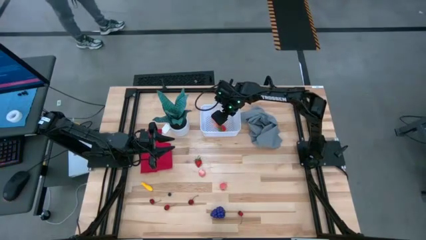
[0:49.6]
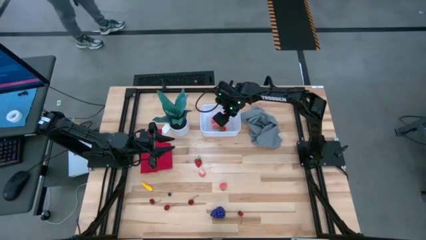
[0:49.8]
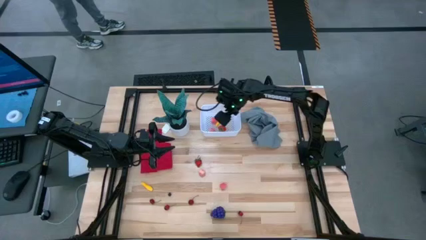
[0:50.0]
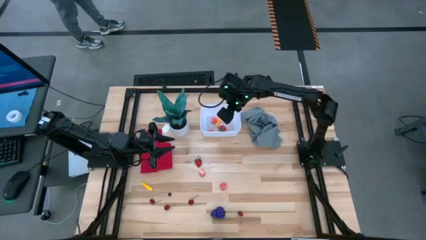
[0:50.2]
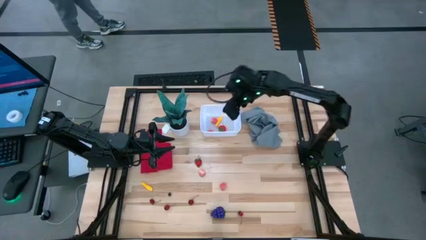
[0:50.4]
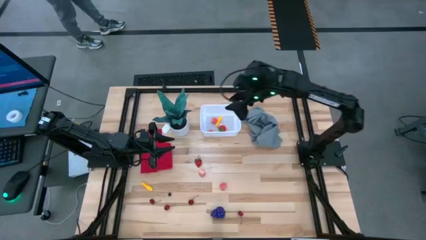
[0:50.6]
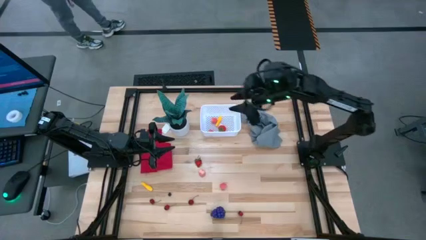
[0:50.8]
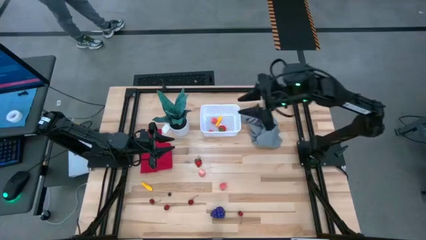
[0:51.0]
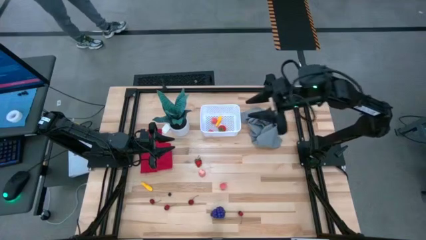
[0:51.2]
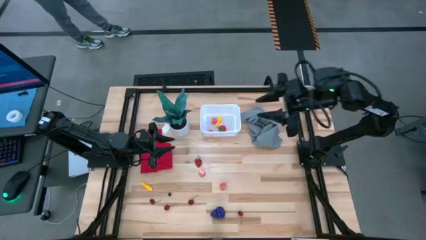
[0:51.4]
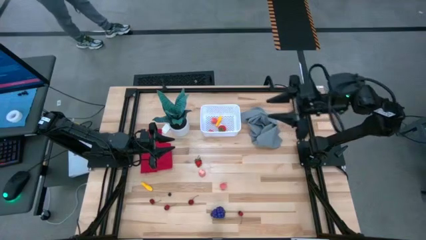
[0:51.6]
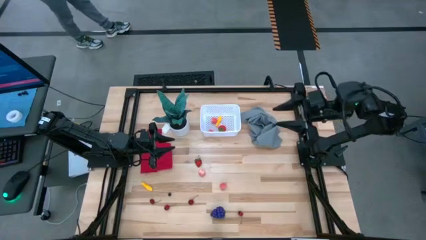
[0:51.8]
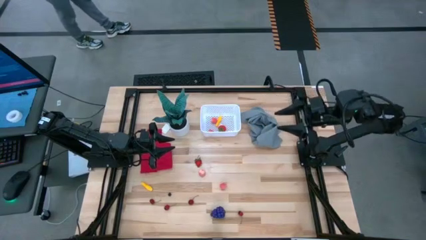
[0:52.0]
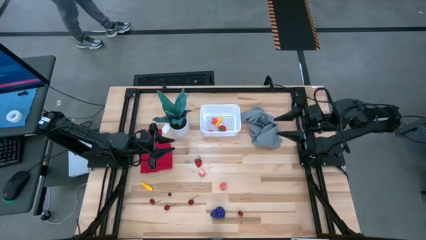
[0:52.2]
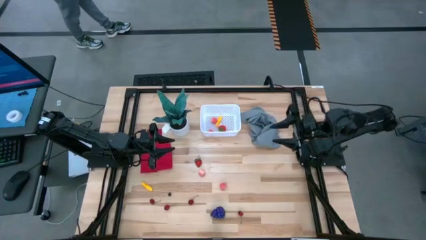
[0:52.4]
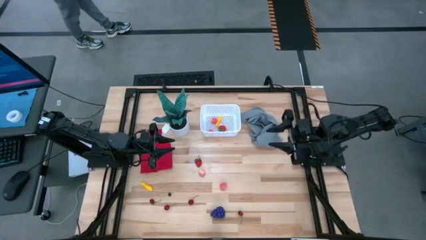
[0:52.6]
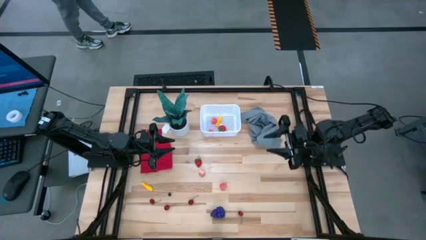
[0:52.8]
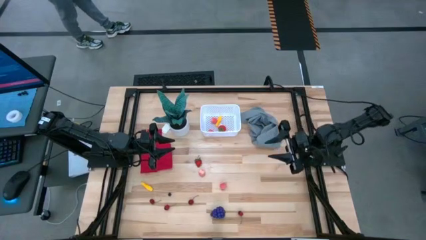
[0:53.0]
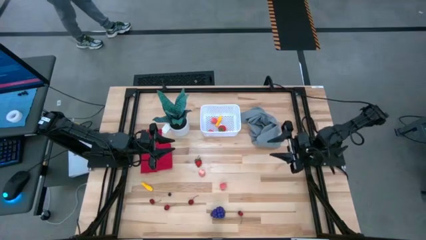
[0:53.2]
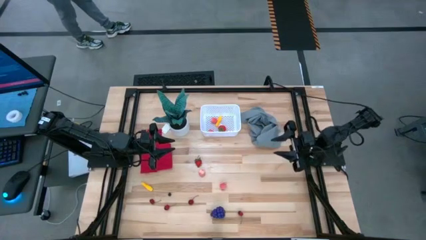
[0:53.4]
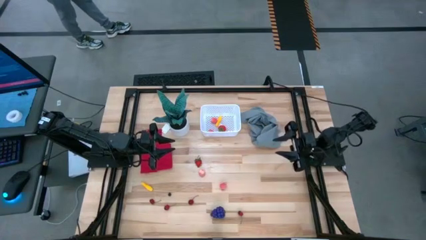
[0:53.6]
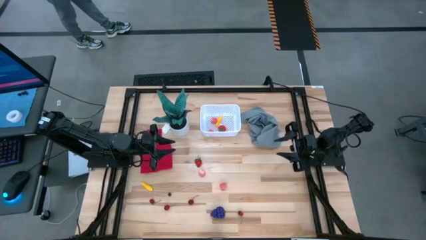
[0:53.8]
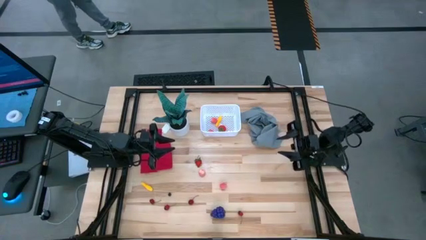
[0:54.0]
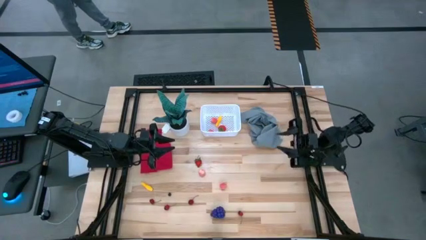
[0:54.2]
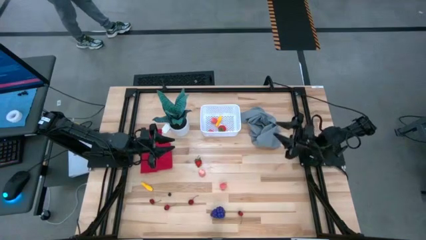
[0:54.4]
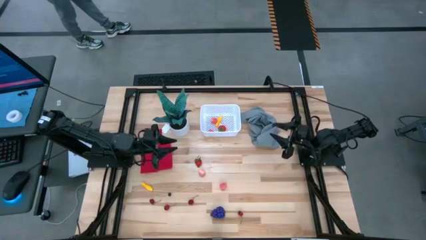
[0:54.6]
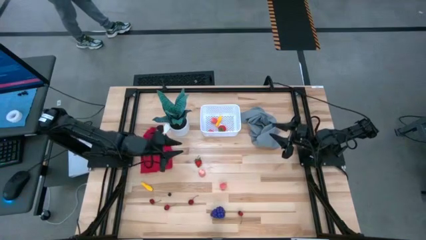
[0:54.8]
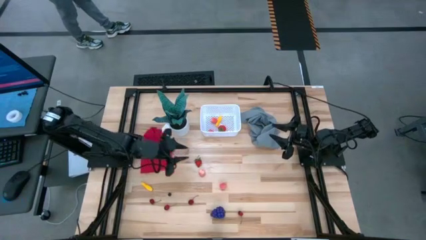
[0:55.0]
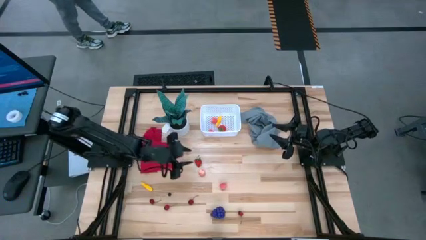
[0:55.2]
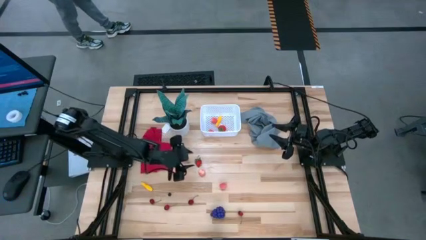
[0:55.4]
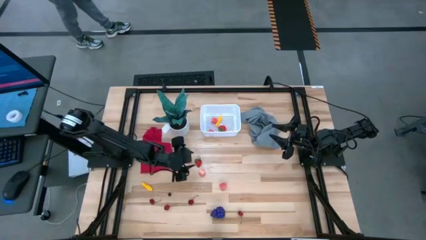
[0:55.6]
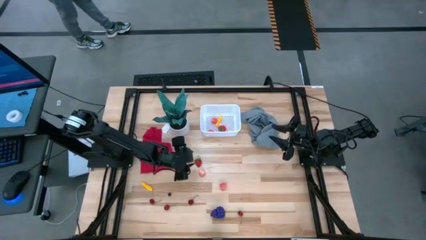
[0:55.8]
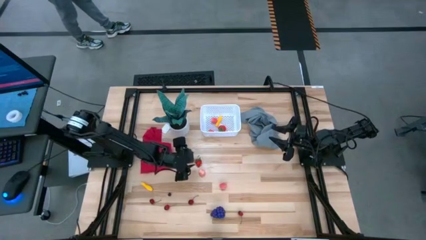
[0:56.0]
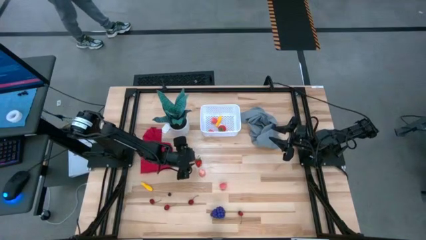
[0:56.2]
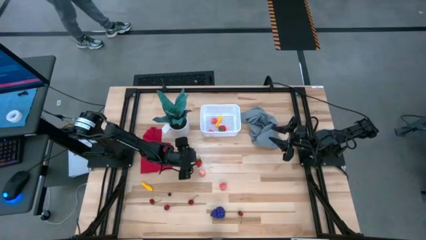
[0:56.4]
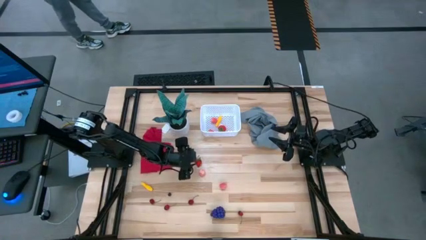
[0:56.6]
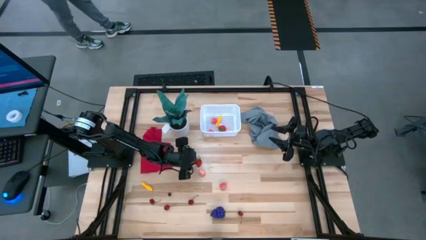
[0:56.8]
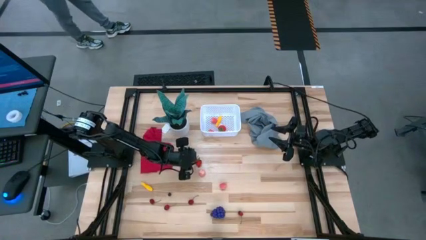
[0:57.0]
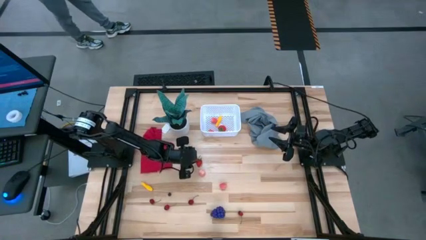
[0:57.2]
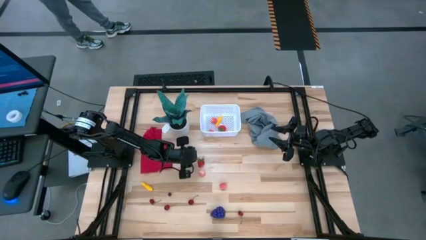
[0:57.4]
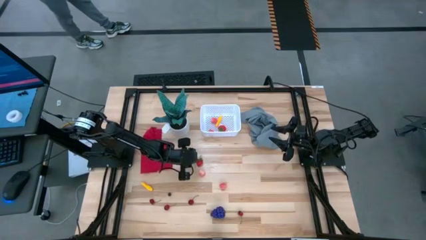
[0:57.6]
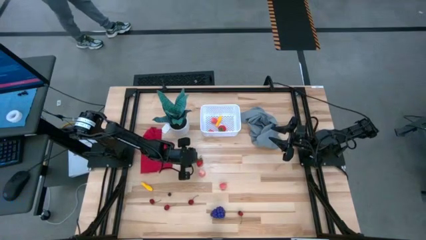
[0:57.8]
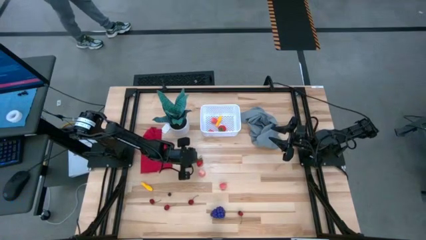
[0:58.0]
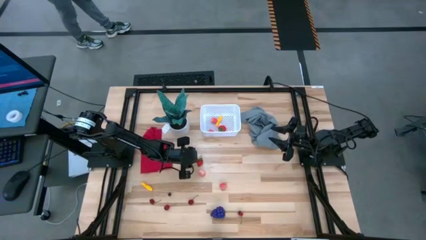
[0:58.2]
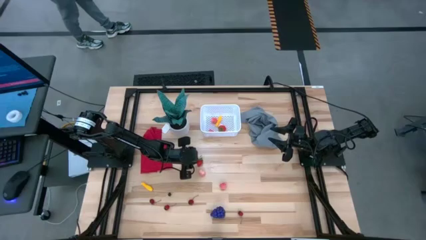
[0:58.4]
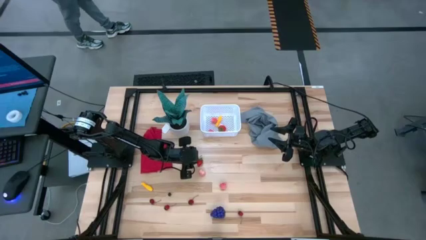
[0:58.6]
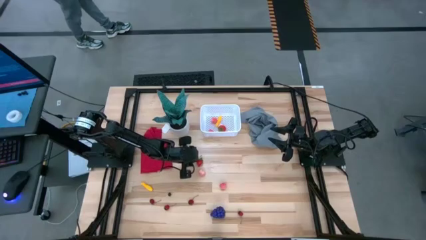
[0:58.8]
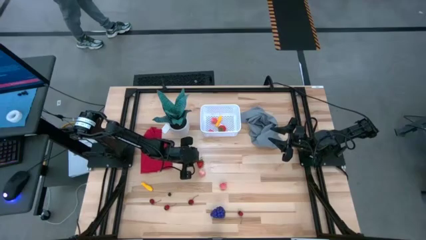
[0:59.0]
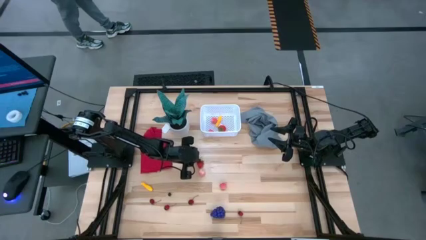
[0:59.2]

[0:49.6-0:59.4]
Task: Pick and placing Produce into tupperware
Put the red strawberry into the white bin

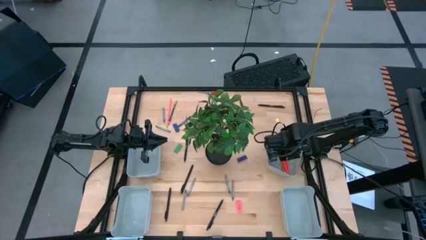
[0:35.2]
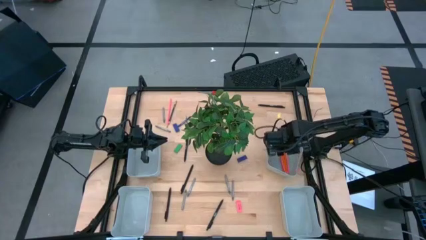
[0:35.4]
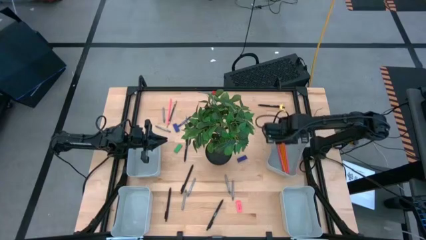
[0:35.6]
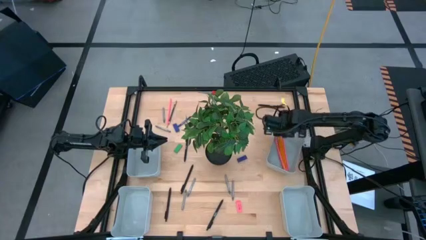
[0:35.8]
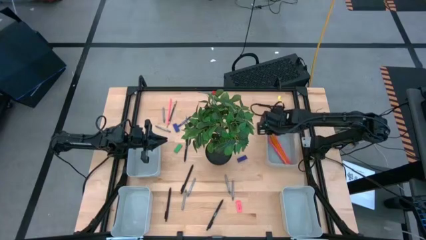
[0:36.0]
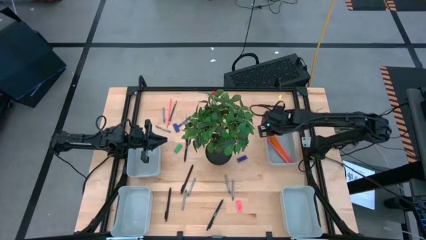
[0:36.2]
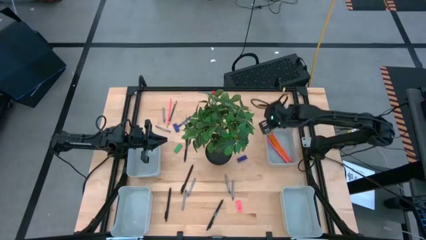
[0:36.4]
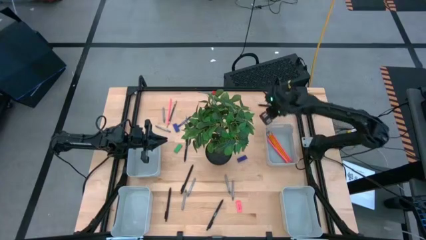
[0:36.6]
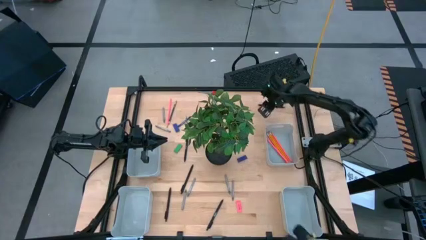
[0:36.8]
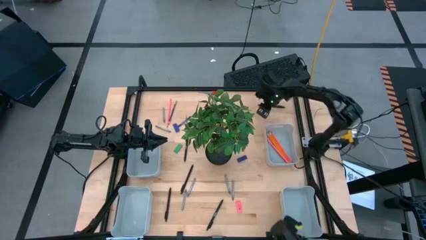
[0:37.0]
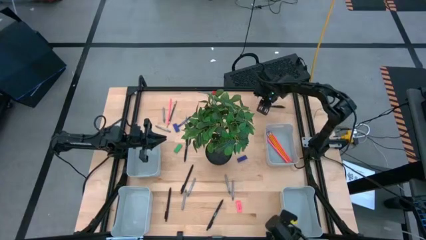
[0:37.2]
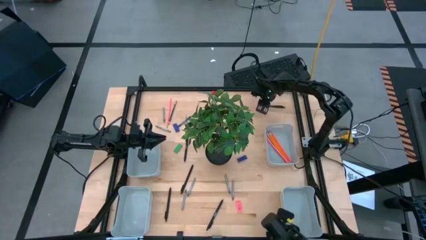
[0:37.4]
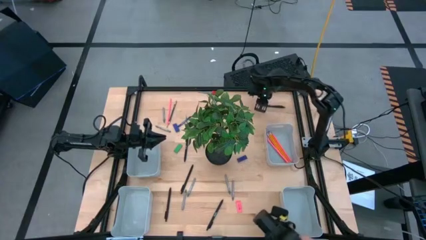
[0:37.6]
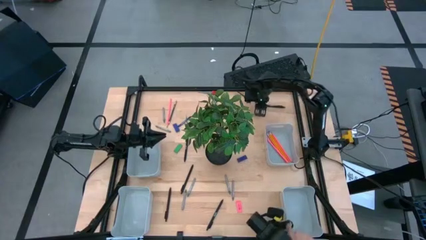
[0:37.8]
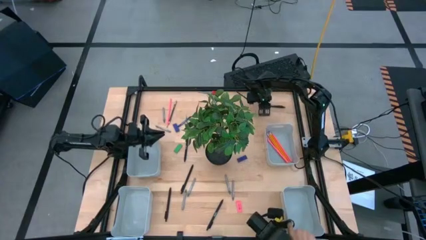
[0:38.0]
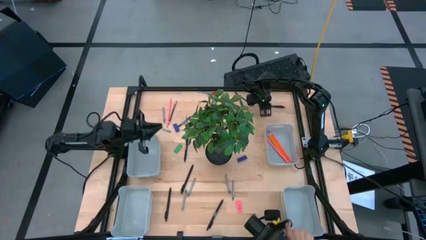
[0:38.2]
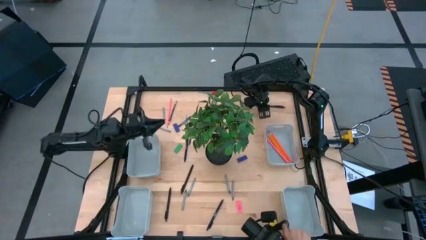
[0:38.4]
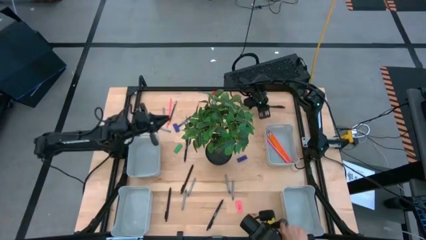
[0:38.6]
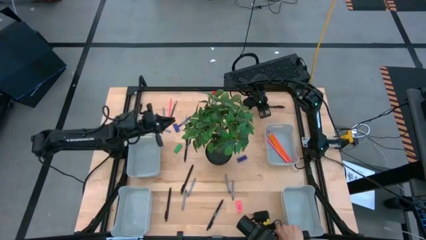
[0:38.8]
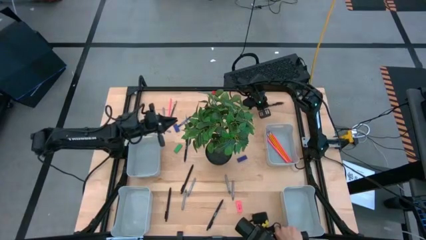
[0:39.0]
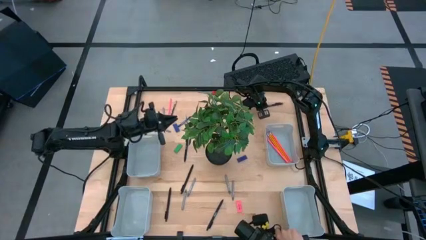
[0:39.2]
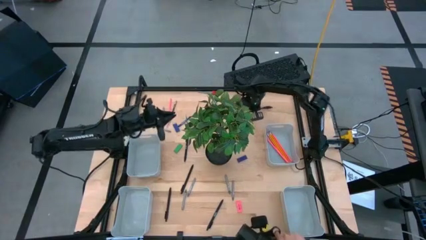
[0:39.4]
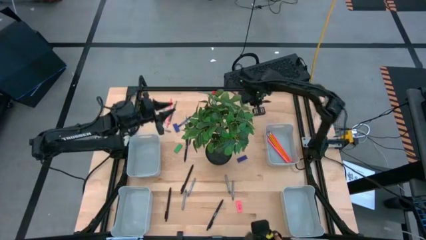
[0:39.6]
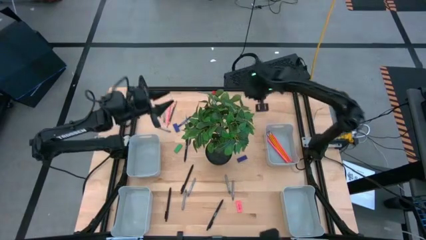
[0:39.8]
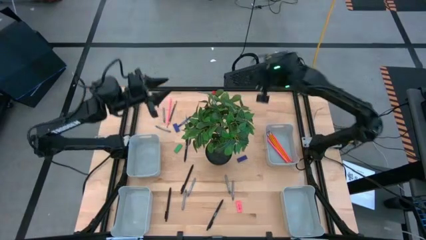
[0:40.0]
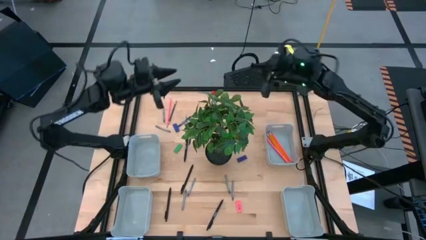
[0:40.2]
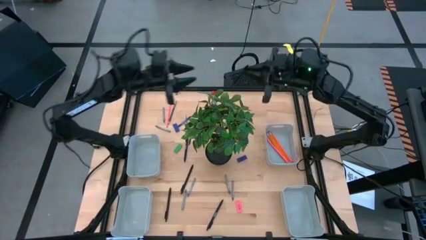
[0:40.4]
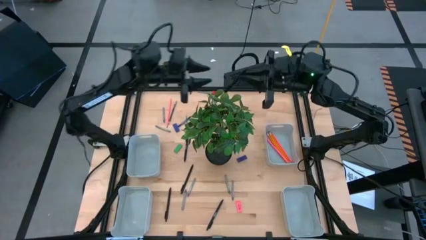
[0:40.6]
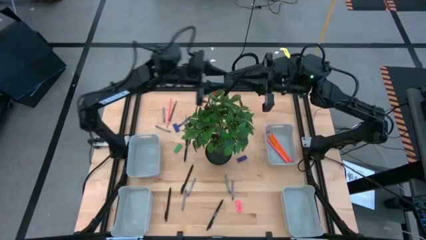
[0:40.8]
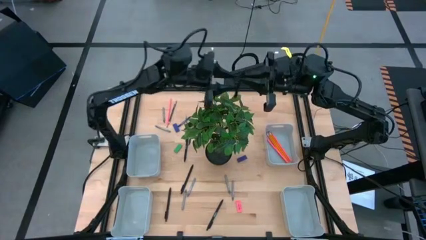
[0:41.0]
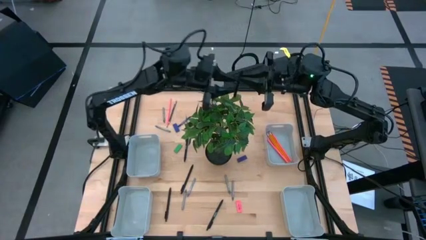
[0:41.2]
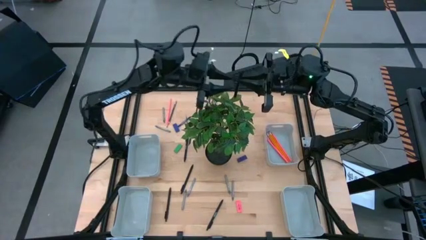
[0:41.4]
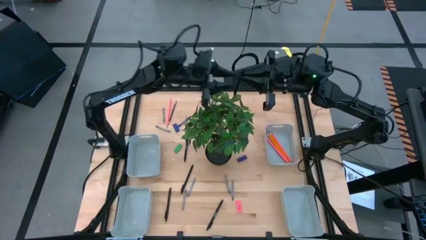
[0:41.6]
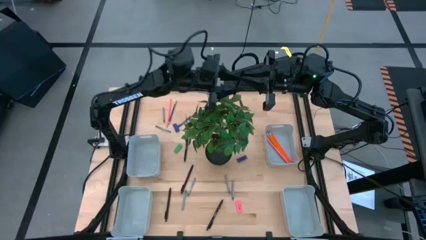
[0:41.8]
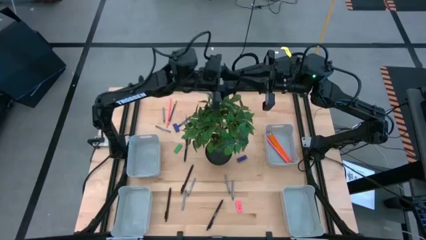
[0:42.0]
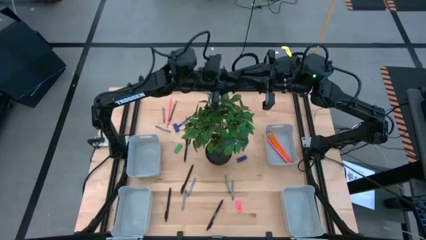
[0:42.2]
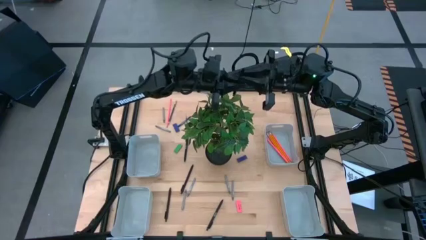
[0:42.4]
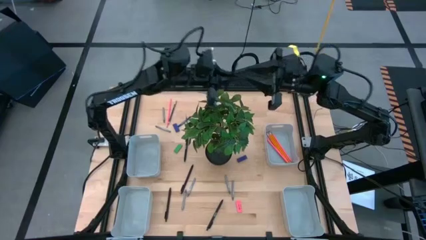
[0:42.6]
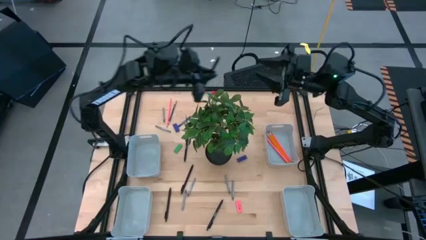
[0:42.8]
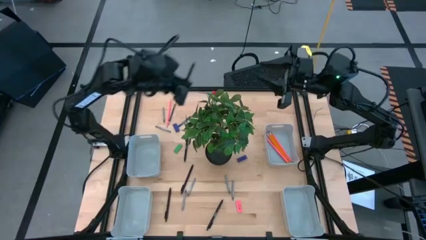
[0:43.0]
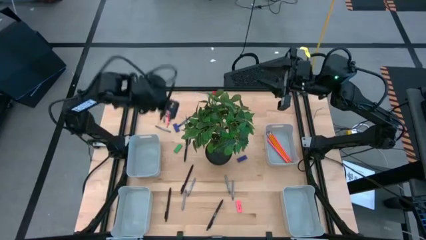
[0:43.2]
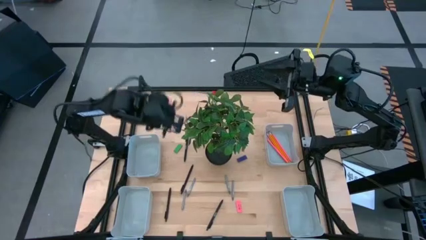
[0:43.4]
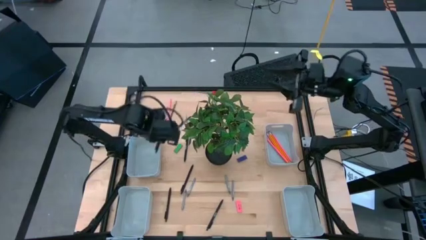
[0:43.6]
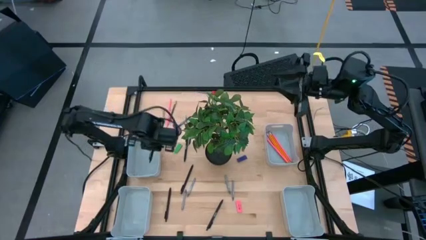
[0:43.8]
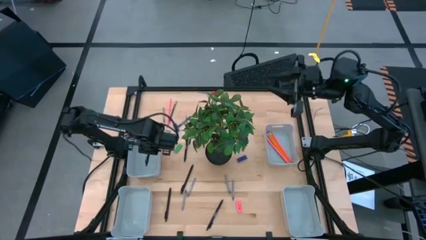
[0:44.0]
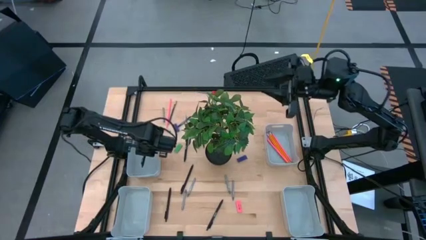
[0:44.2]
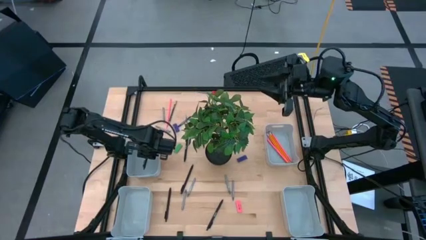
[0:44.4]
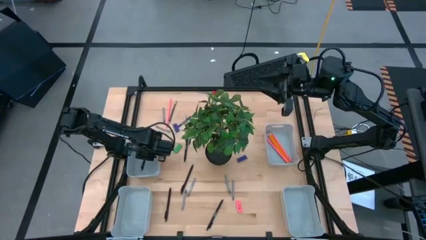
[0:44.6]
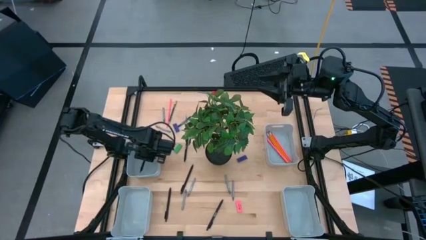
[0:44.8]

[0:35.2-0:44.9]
Task: Sort crayons/erasers/pens/pencils in bins
Put the black pen into the top left gray bin
